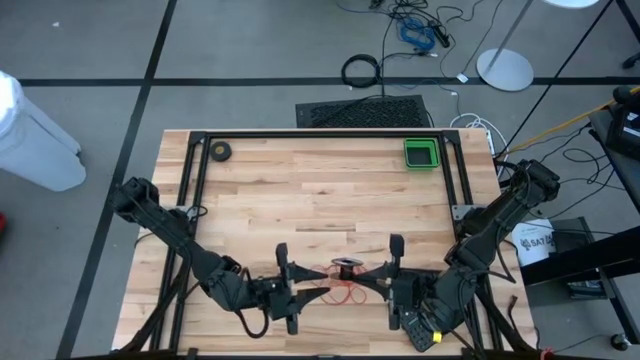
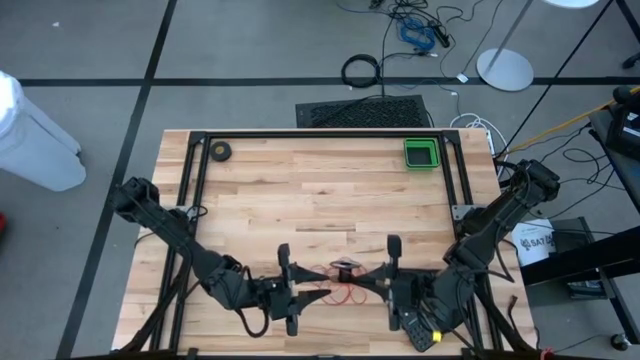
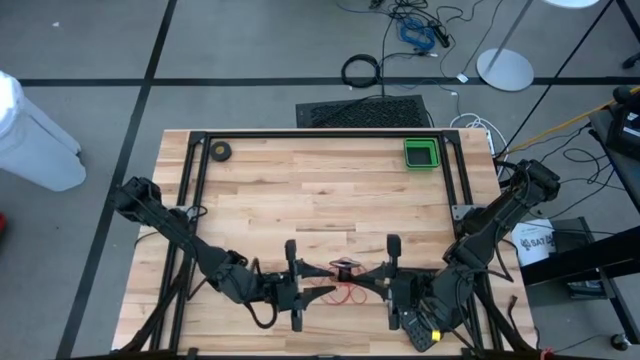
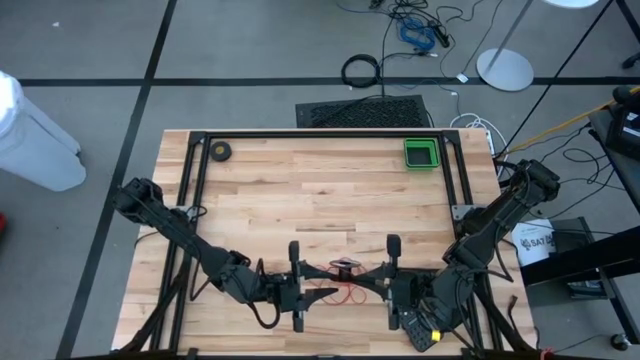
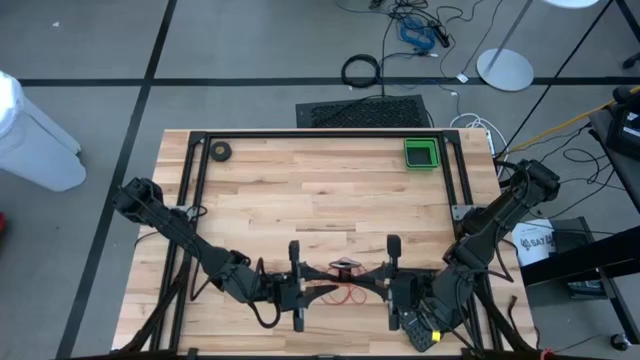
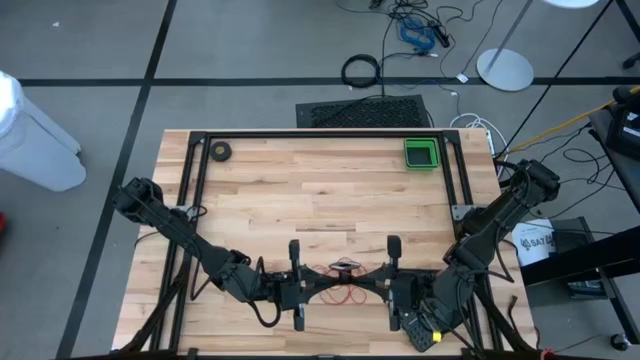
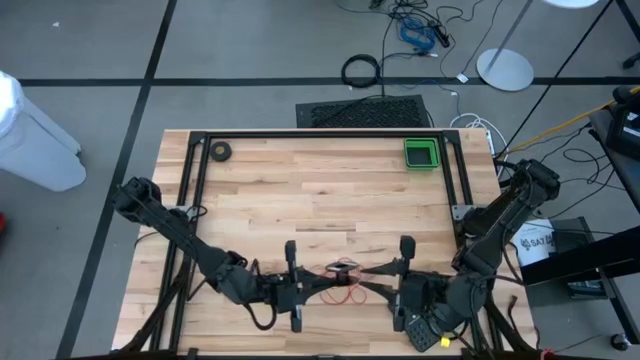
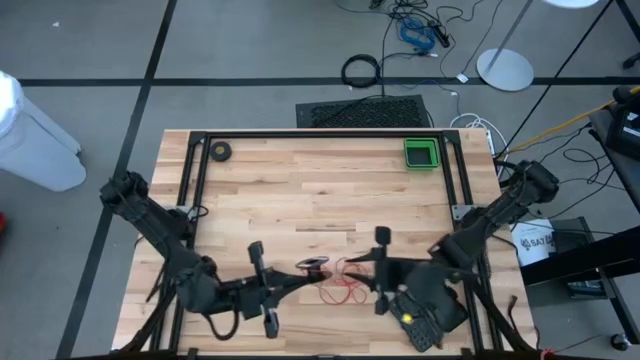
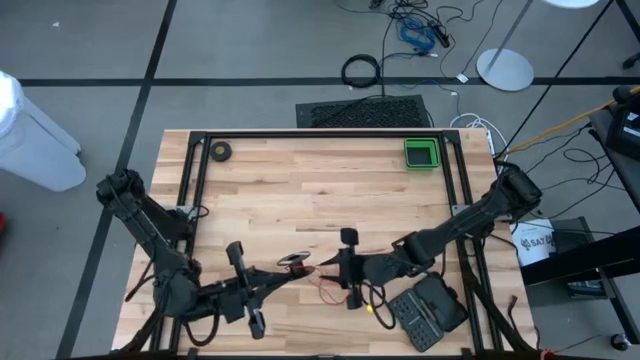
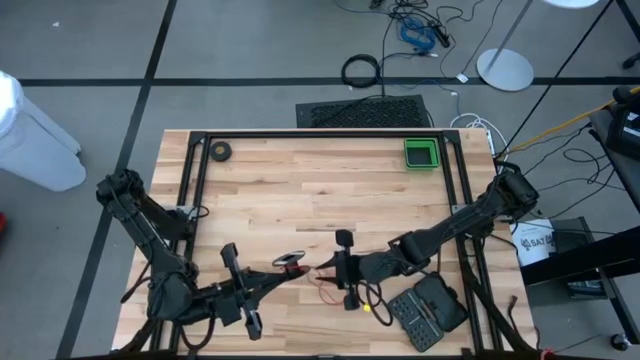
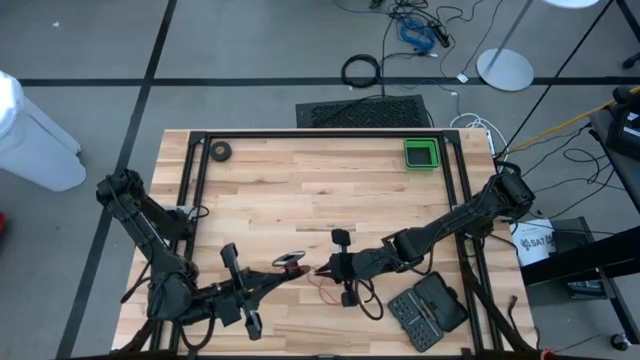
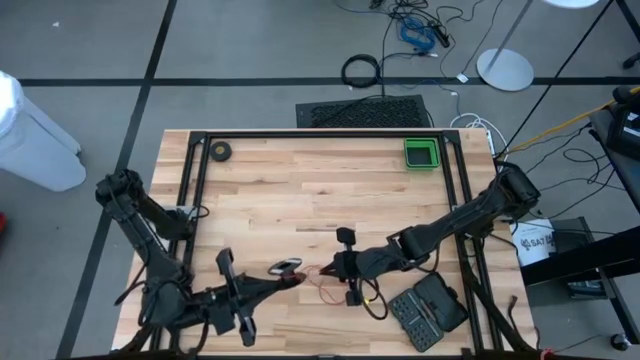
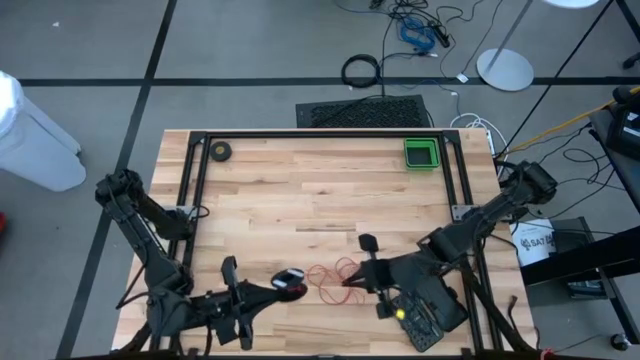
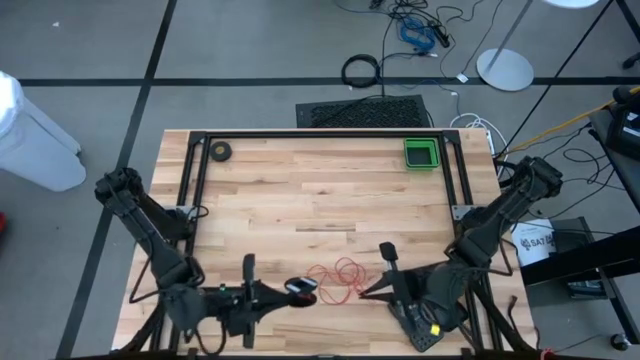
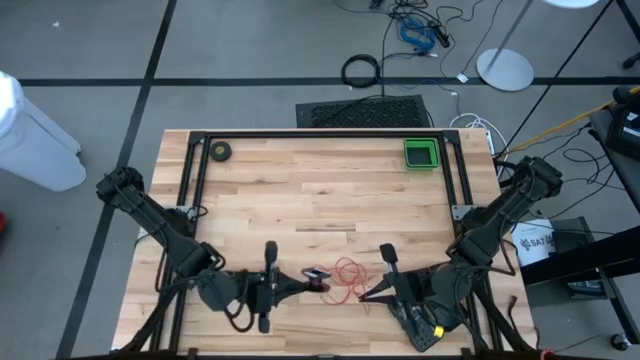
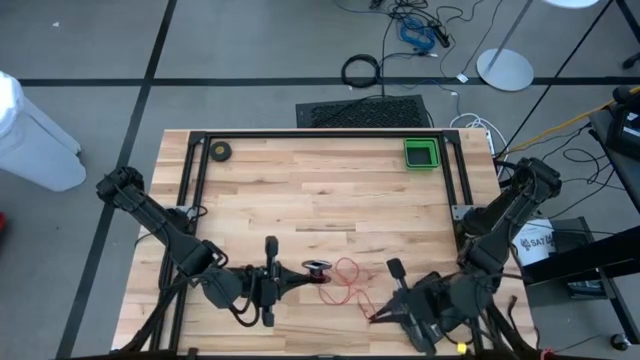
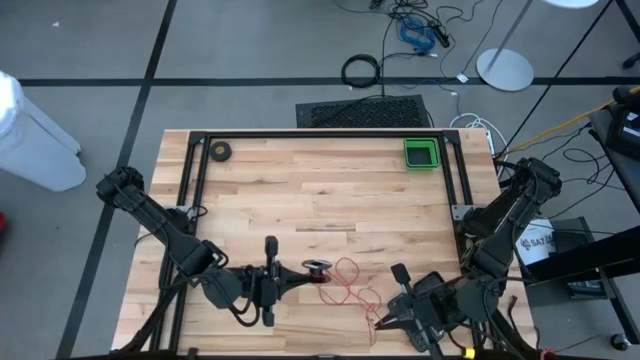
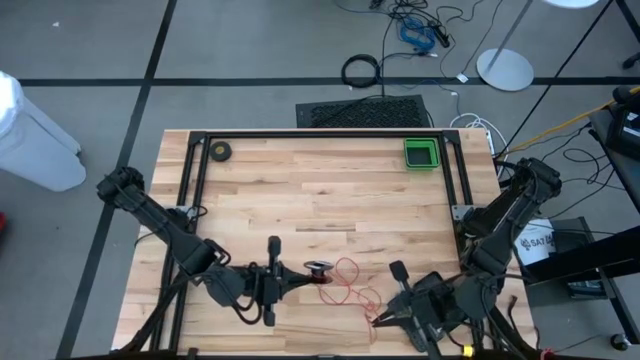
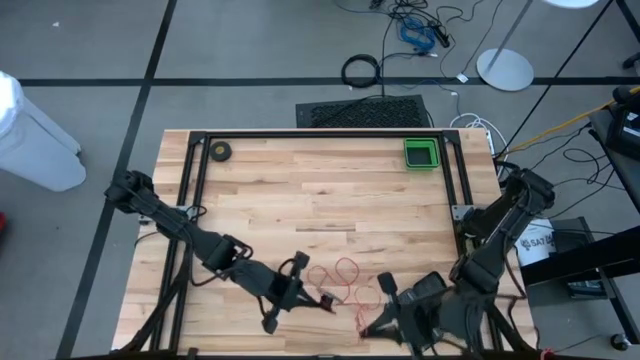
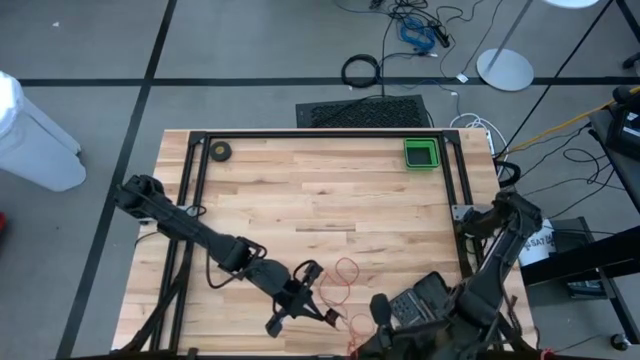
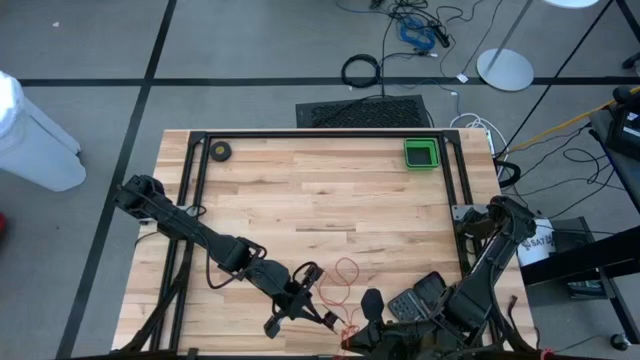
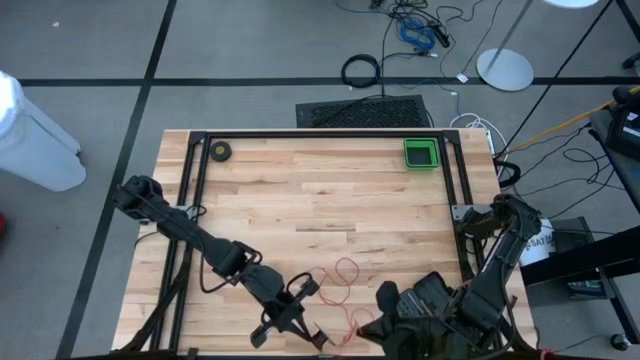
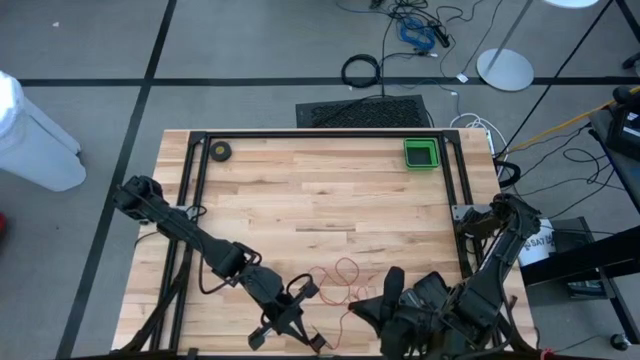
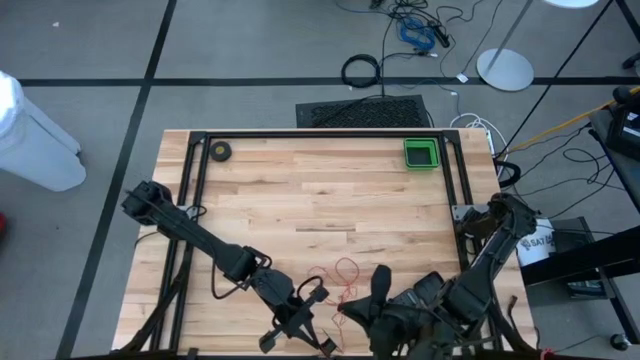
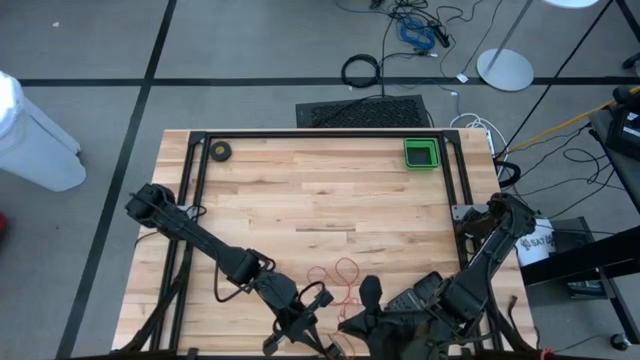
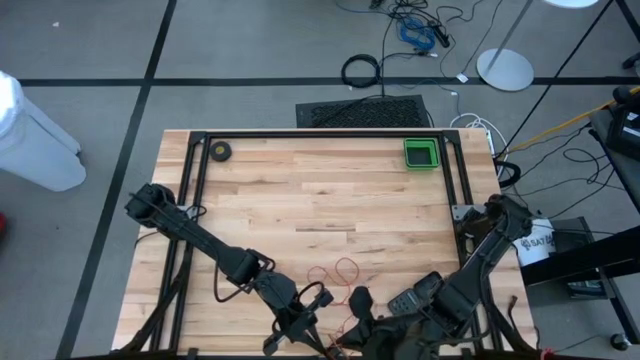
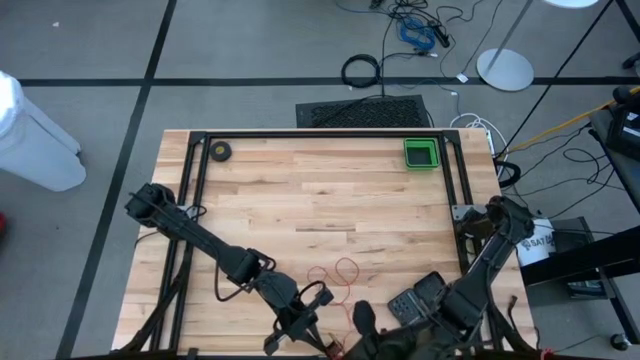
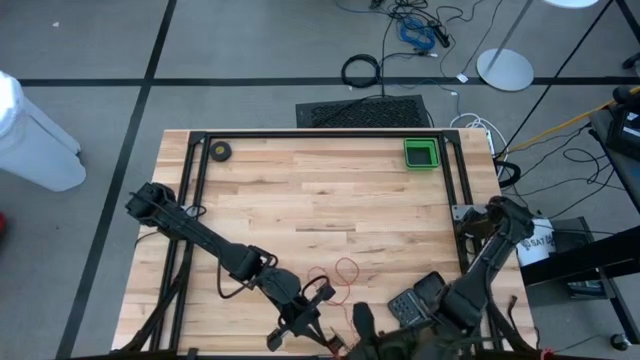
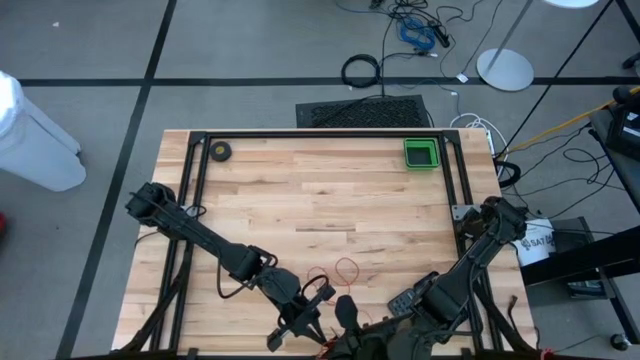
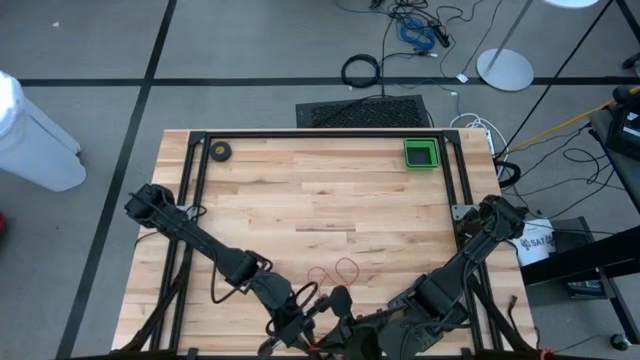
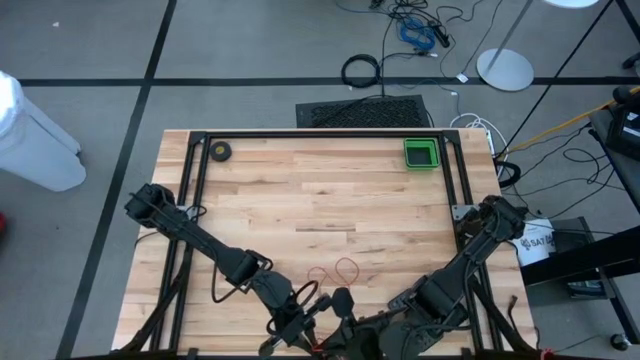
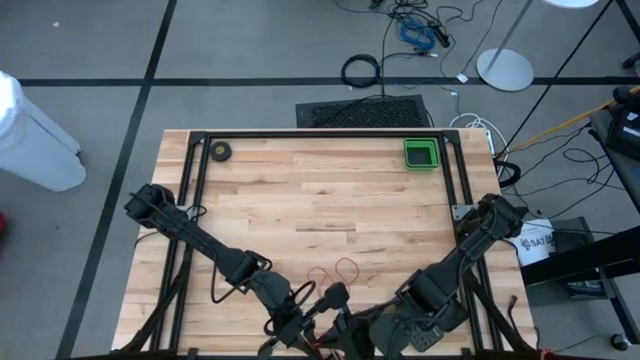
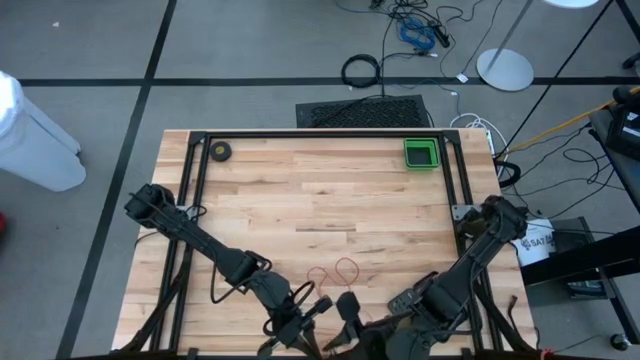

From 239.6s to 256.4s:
Task: Coil cords
Coil the red wire into the spool
